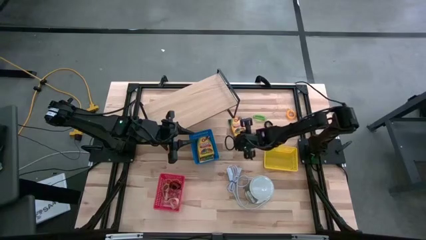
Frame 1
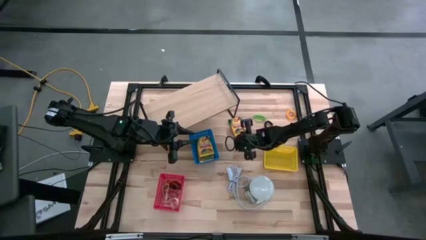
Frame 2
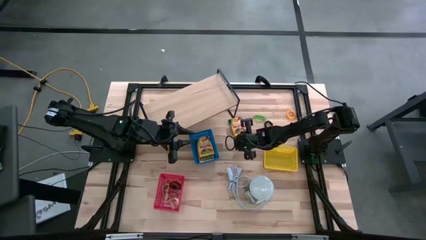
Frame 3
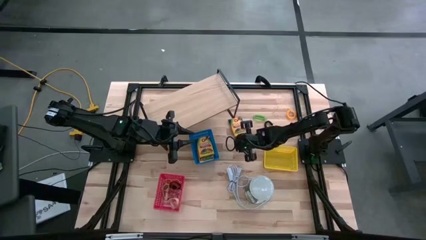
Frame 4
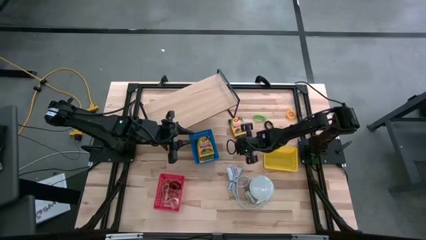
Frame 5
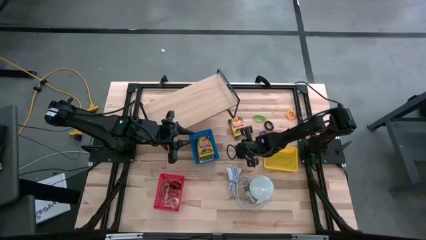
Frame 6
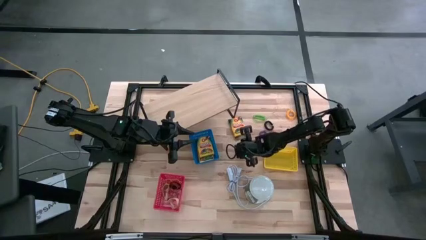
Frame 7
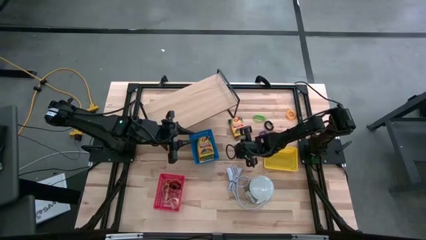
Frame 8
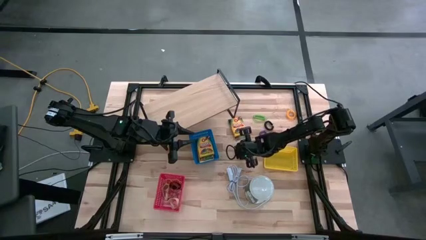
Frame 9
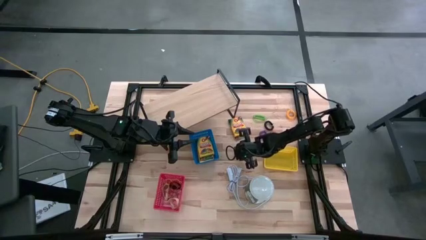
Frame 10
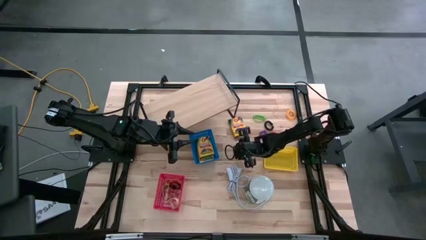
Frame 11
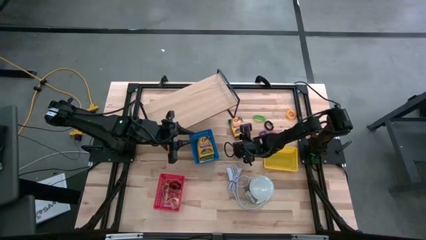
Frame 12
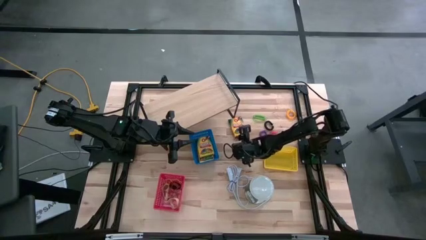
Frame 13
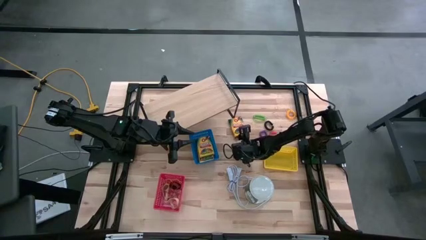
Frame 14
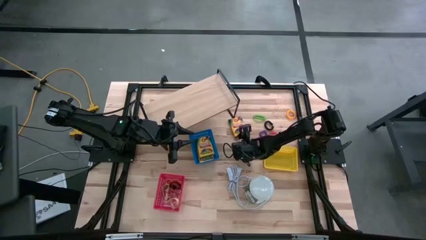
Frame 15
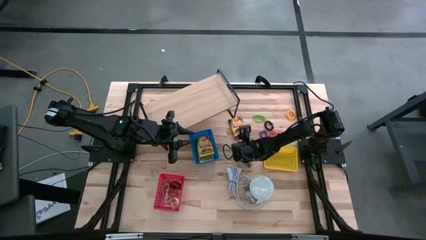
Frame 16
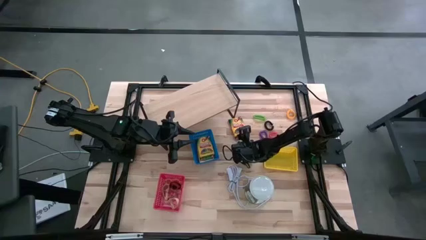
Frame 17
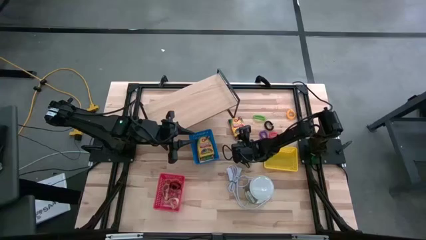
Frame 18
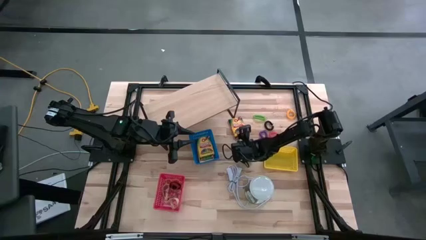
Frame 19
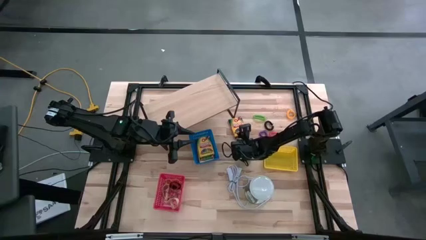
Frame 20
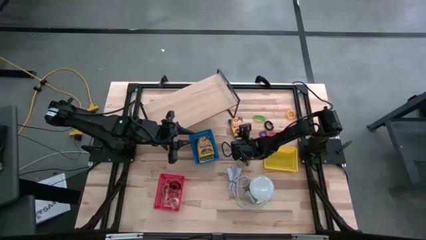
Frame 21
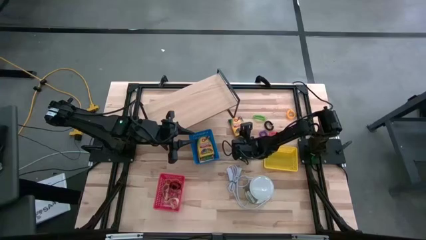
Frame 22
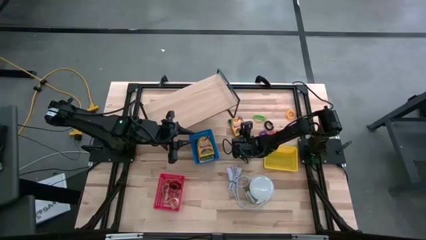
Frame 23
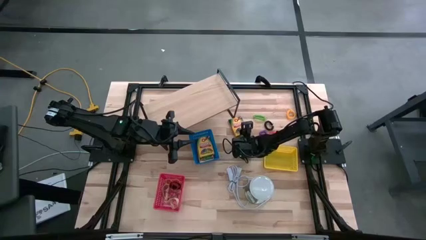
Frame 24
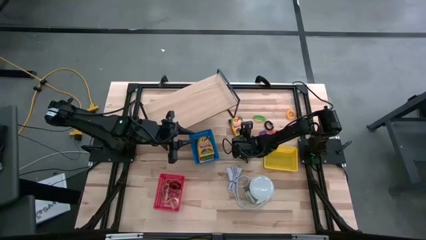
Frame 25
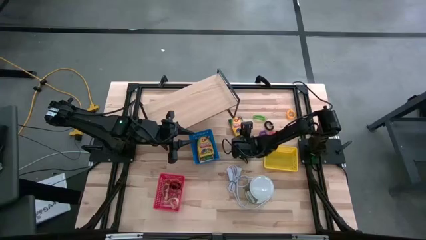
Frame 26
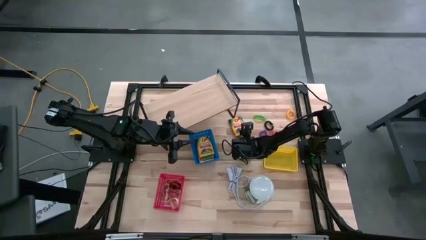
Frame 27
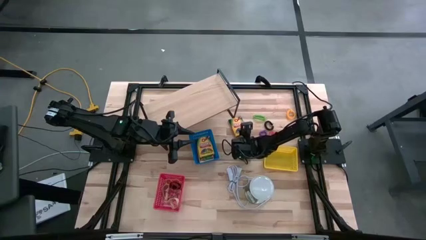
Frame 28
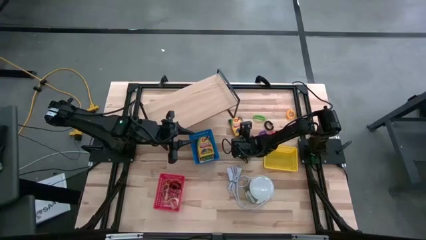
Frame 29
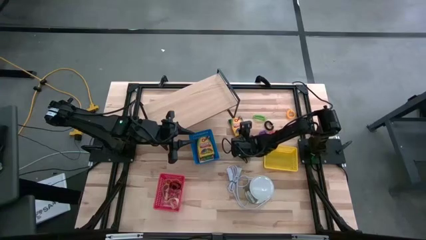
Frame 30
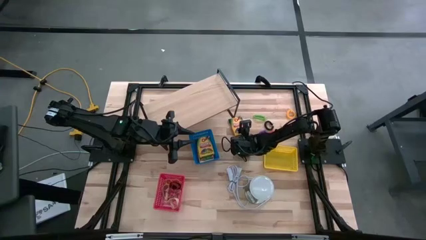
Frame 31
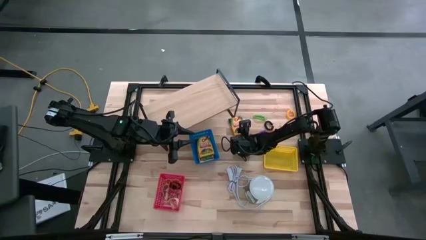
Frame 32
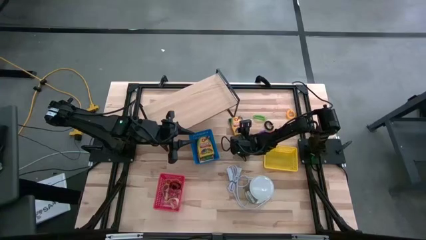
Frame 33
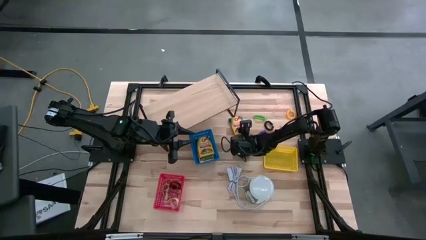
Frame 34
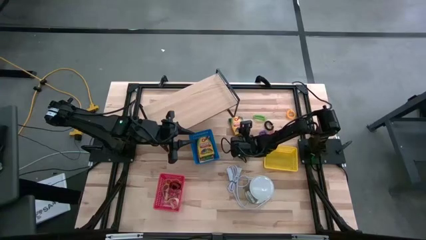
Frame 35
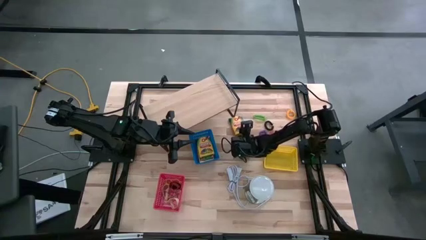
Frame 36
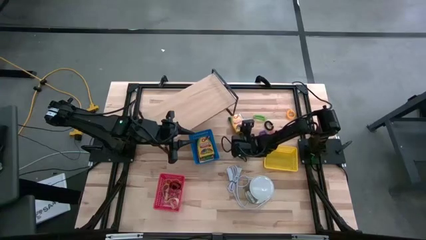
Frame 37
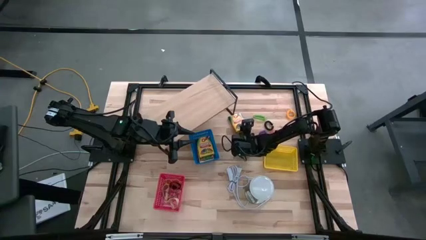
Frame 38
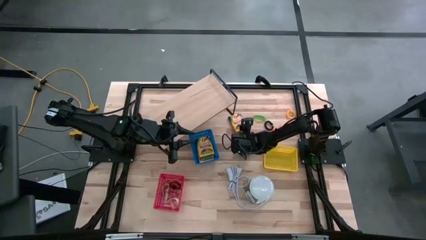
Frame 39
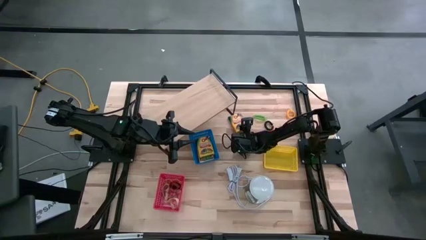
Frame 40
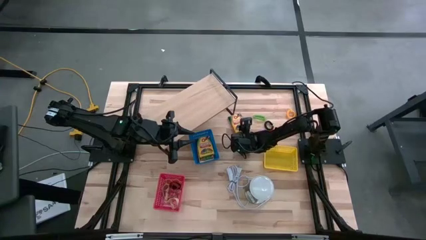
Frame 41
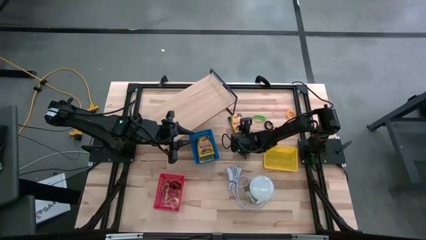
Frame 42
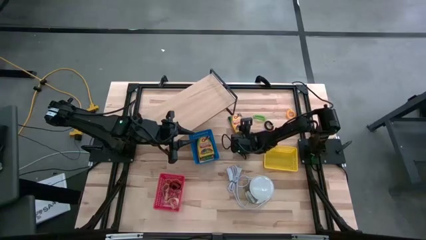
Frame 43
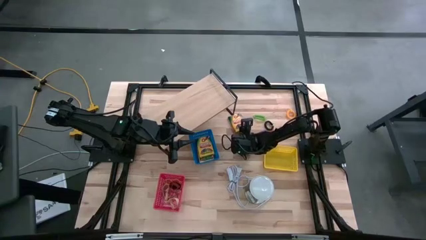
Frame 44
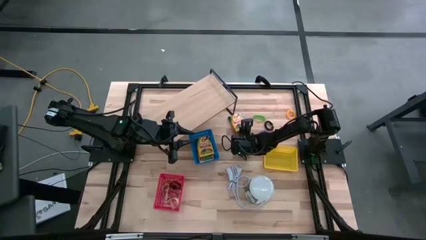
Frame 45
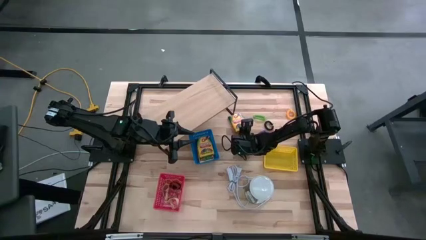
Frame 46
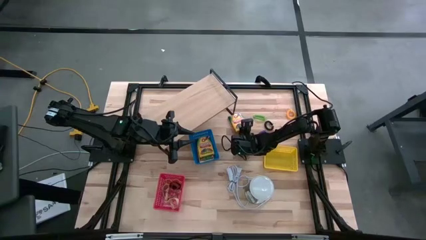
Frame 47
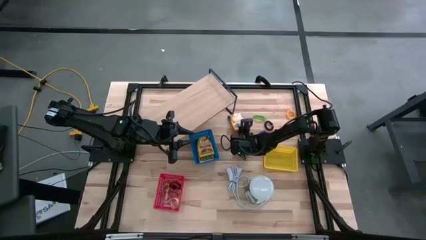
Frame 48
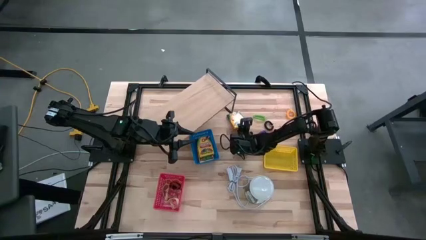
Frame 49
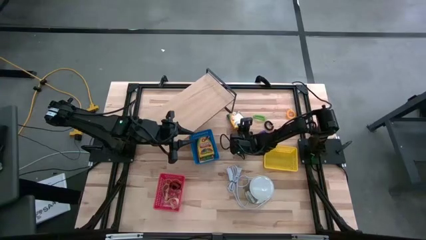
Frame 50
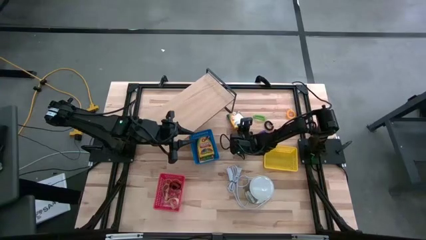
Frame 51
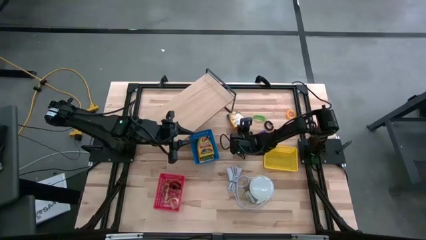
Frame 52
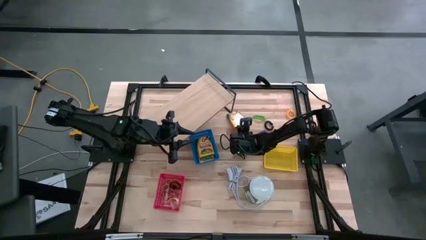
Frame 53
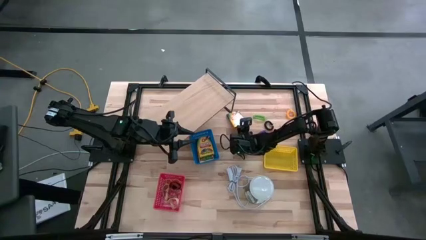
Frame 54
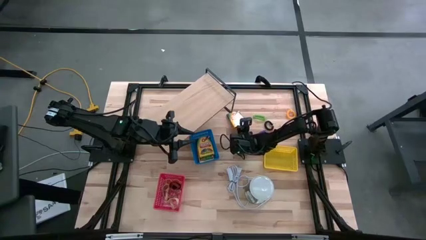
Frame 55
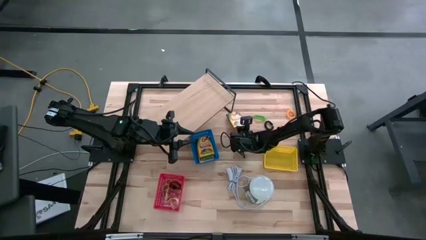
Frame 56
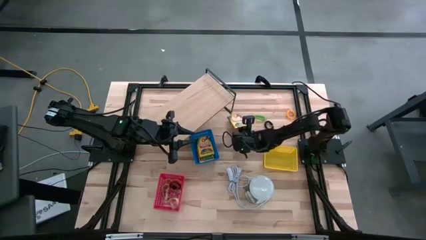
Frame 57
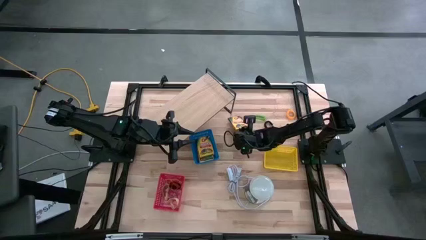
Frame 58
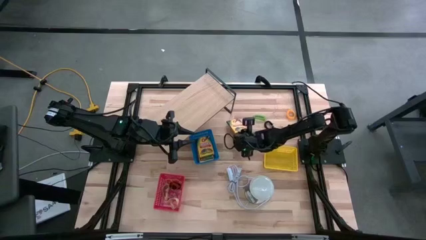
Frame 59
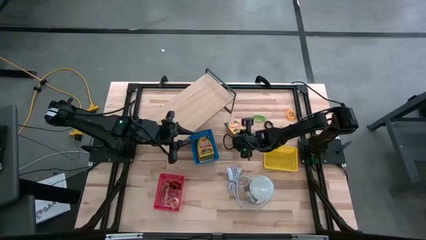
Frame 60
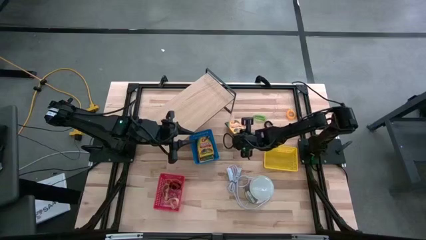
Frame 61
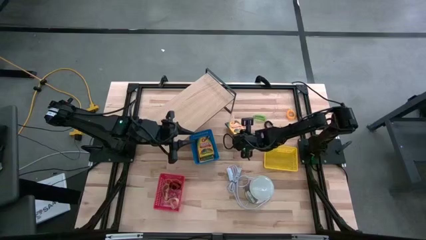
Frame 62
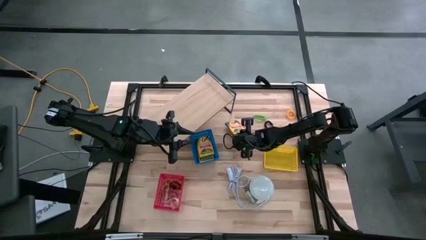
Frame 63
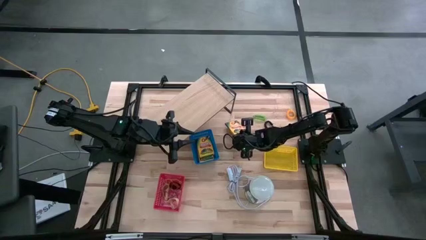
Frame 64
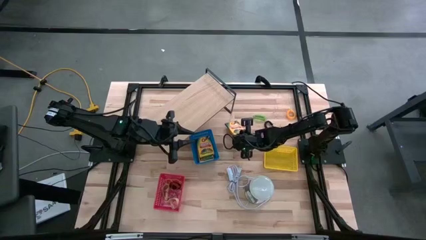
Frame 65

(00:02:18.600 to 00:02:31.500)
Task: Pick & Place Office Desk Supplies
Put the yellow pack of crayon into the blue bin

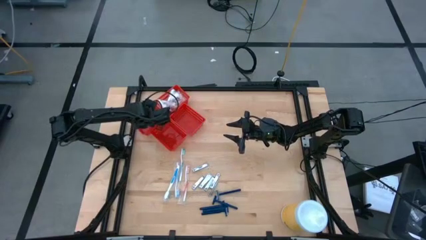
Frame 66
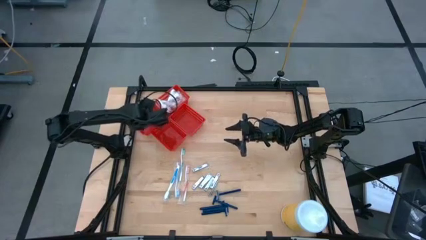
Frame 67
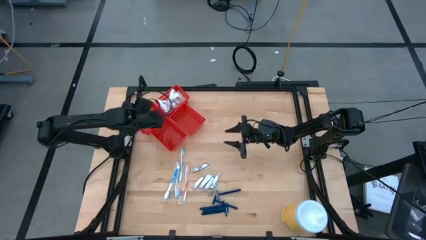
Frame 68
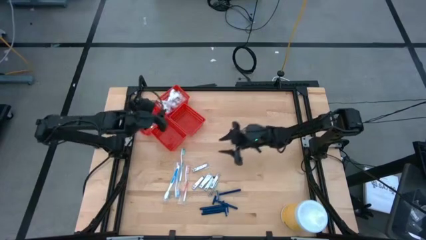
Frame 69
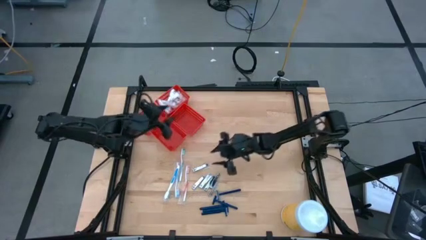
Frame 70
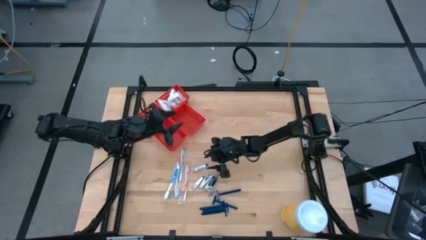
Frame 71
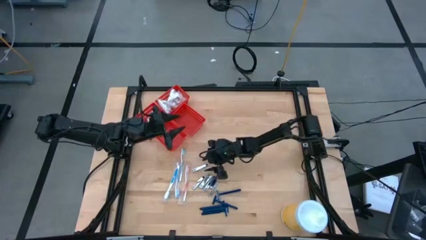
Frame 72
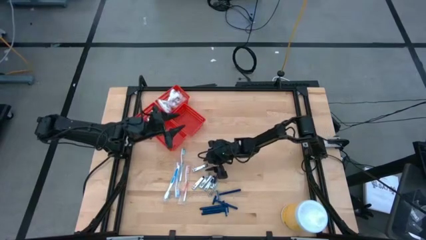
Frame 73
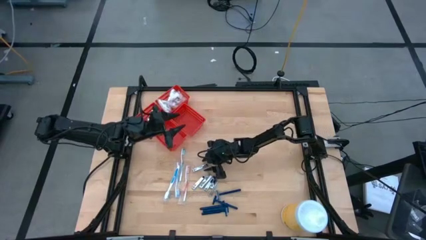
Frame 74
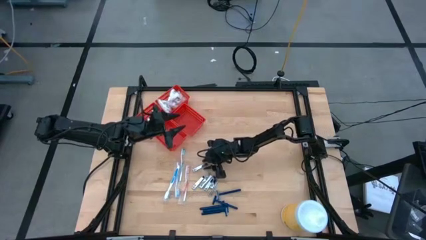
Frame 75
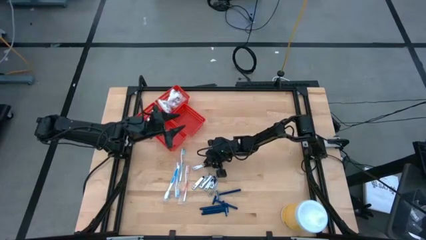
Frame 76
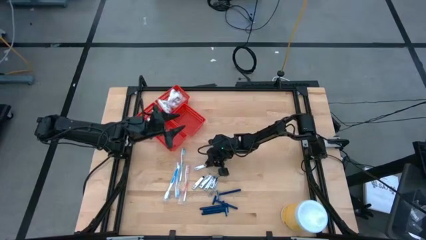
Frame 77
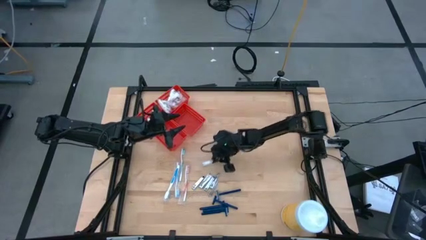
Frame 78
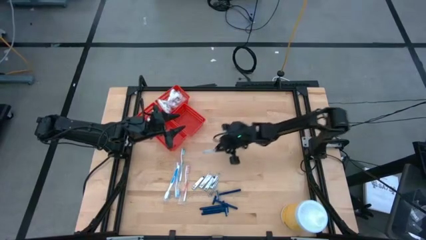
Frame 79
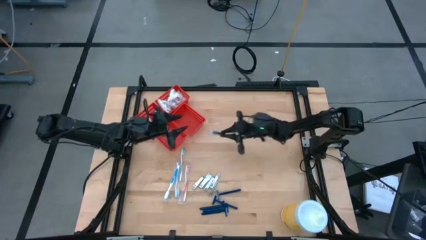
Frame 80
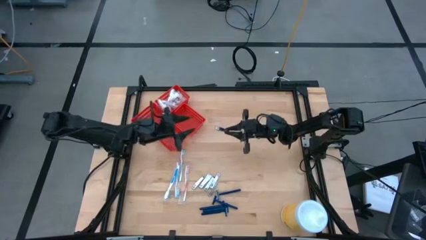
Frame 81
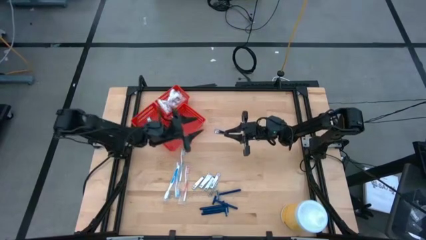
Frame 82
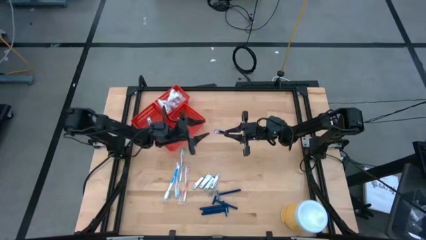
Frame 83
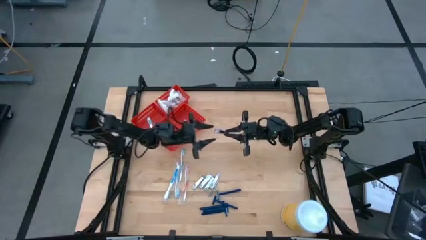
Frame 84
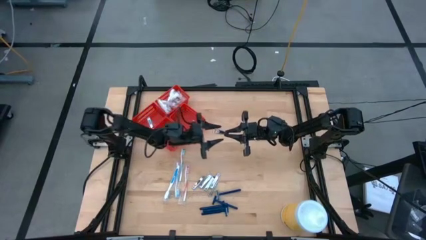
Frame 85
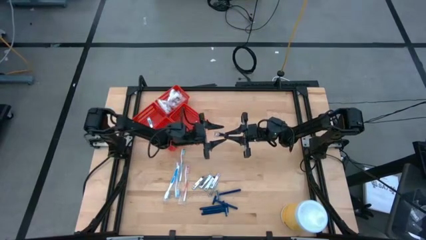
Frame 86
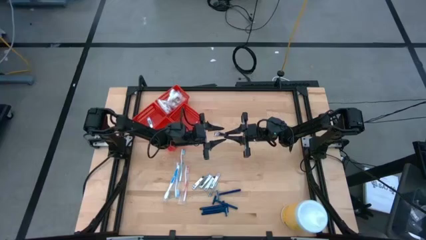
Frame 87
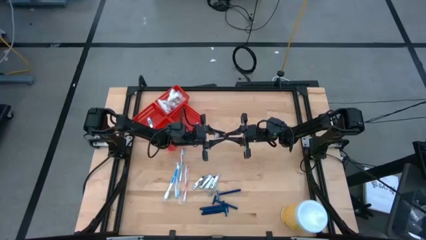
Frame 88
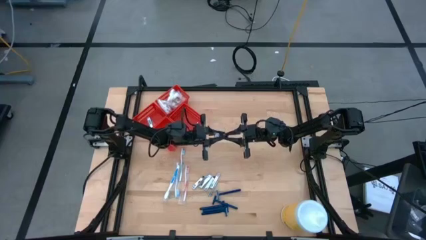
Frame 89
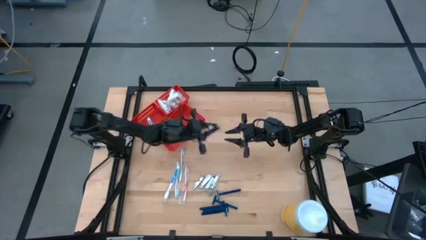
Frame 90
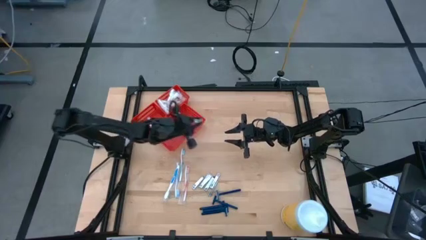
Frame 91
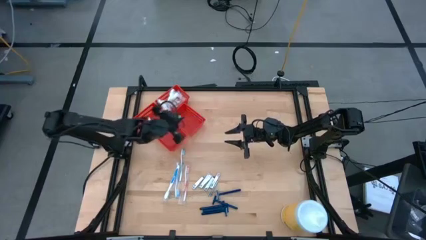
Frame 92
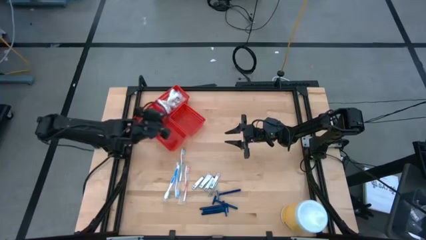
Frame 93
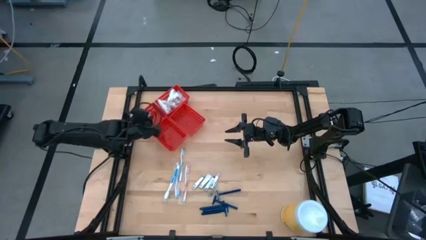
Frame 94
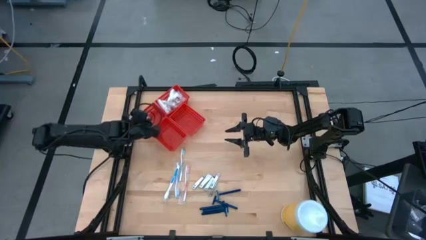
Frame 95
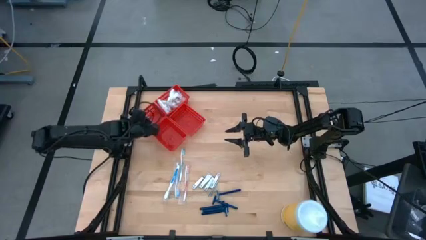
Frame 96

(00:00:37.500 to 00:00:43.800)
Task: Pick & Place Travel size toiletries
Put the nail cutter into the horizontal left red bin
